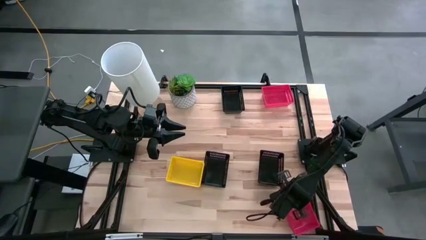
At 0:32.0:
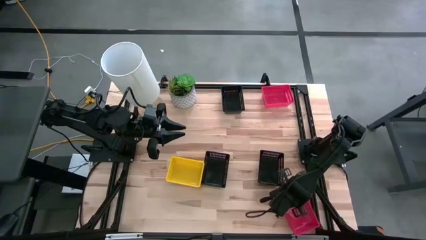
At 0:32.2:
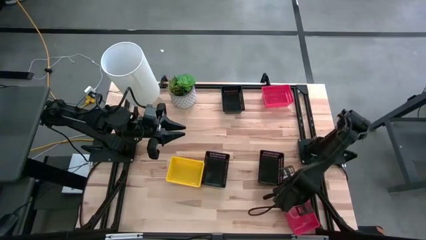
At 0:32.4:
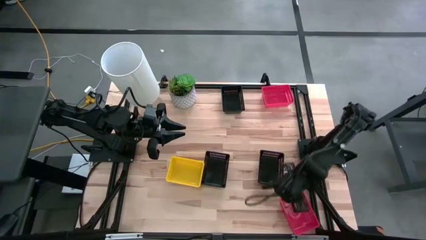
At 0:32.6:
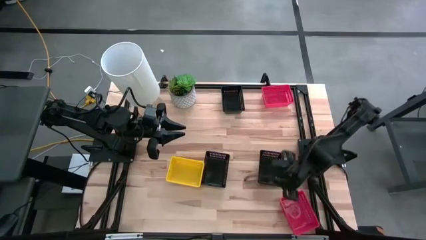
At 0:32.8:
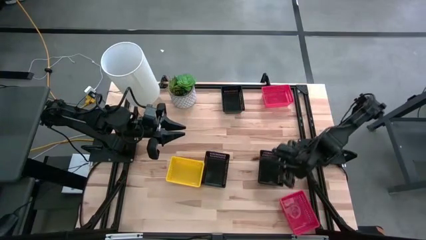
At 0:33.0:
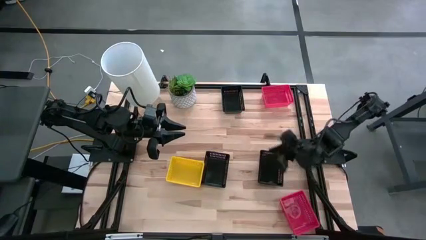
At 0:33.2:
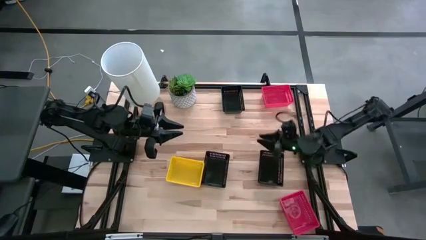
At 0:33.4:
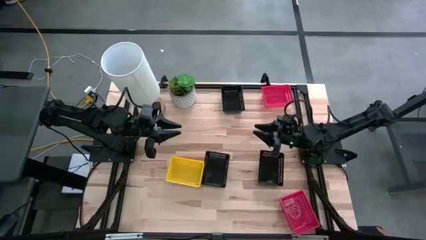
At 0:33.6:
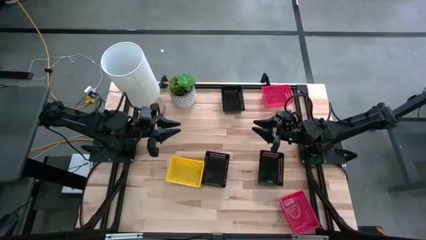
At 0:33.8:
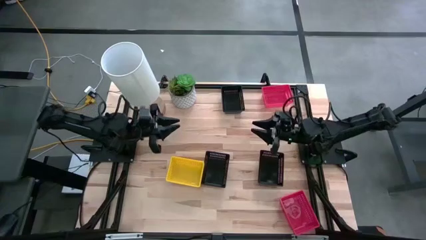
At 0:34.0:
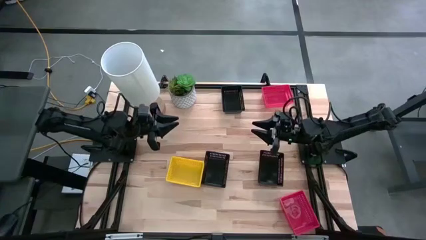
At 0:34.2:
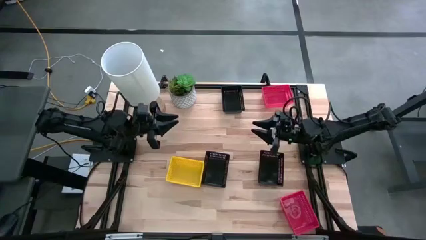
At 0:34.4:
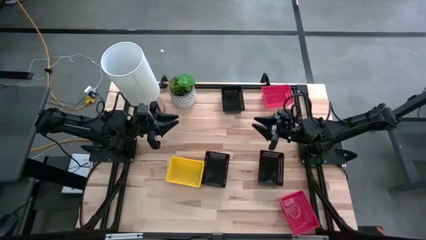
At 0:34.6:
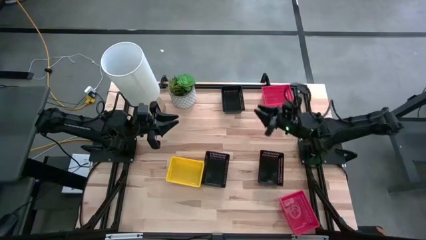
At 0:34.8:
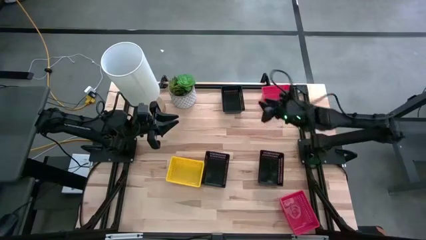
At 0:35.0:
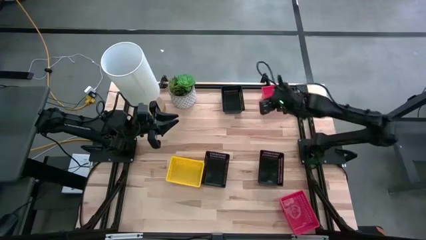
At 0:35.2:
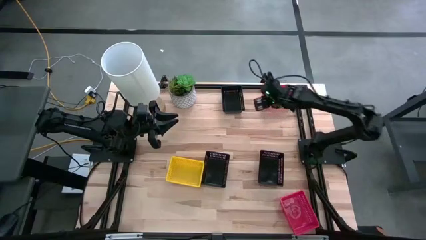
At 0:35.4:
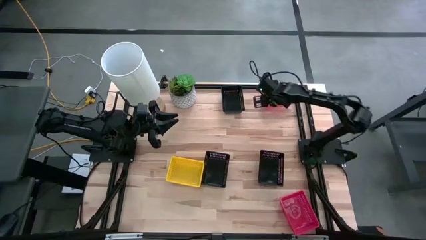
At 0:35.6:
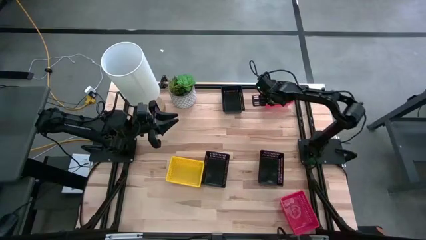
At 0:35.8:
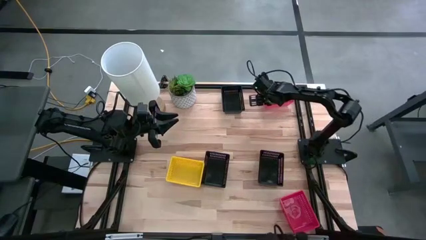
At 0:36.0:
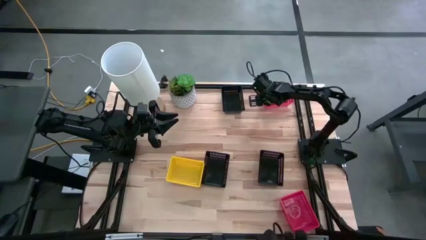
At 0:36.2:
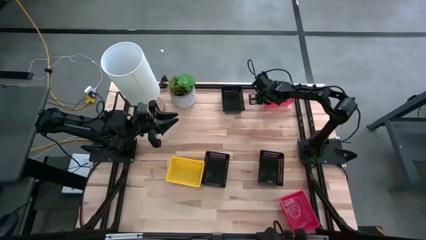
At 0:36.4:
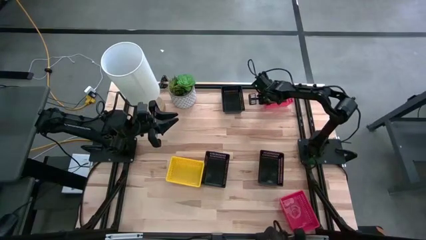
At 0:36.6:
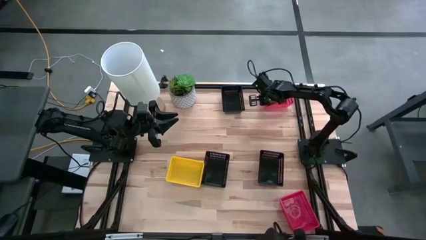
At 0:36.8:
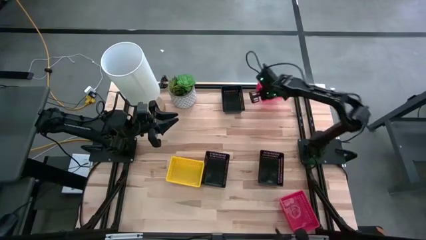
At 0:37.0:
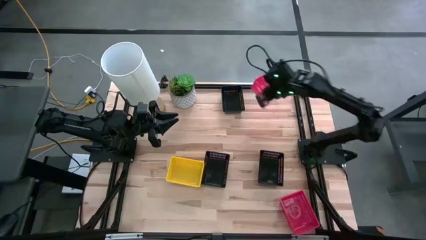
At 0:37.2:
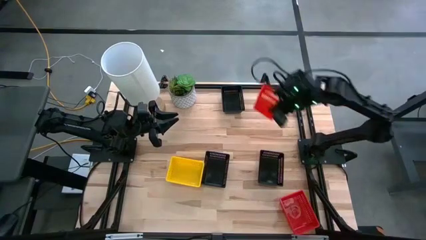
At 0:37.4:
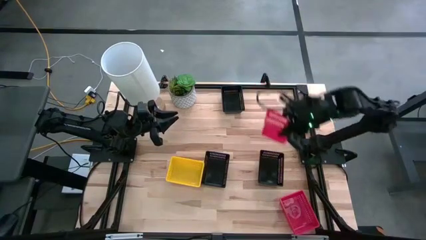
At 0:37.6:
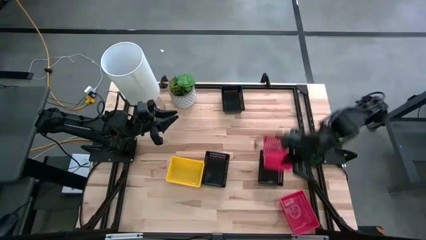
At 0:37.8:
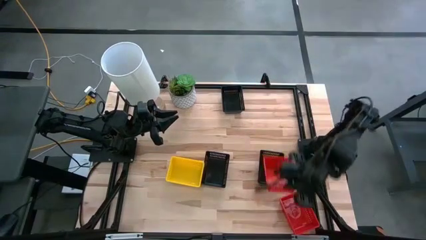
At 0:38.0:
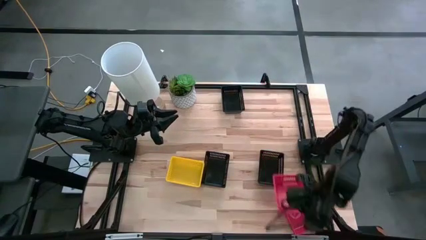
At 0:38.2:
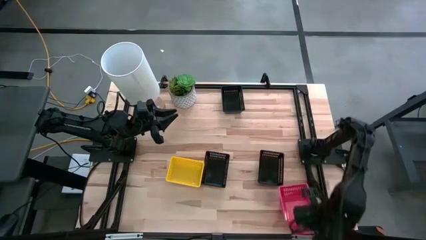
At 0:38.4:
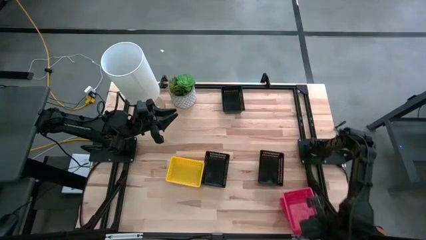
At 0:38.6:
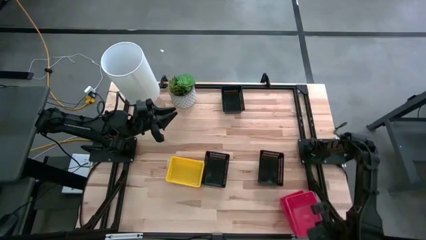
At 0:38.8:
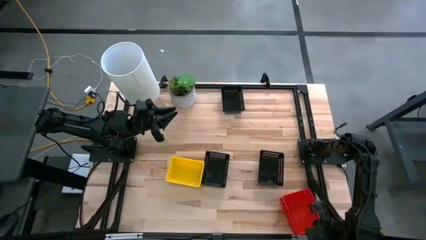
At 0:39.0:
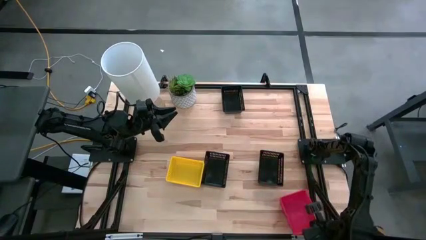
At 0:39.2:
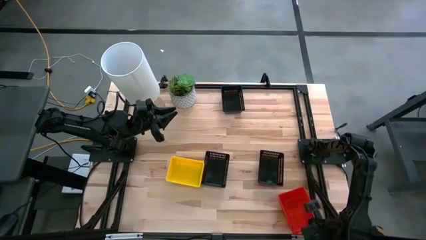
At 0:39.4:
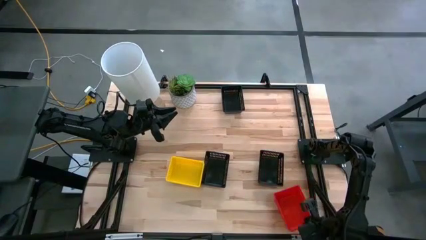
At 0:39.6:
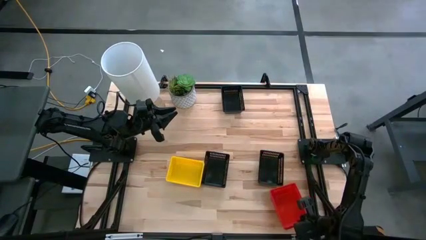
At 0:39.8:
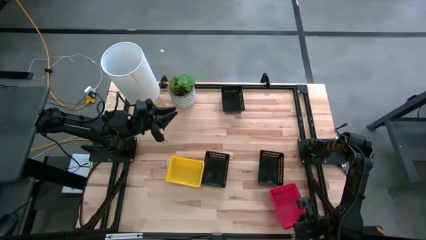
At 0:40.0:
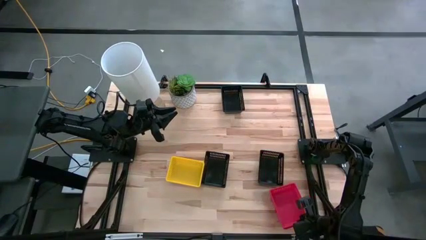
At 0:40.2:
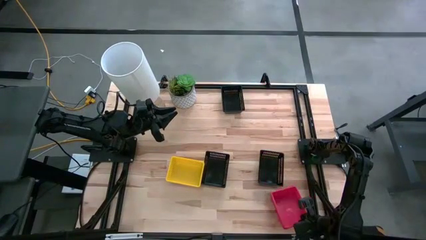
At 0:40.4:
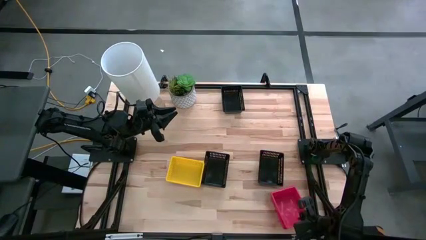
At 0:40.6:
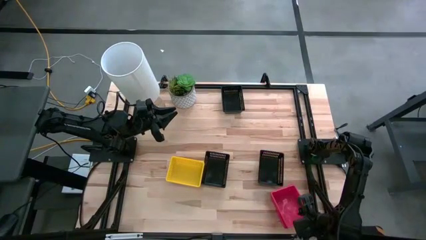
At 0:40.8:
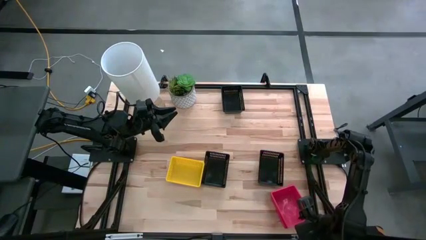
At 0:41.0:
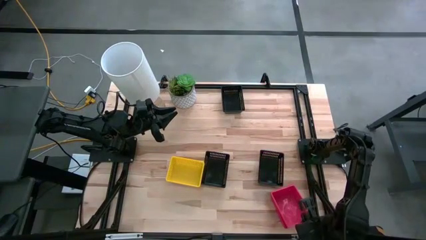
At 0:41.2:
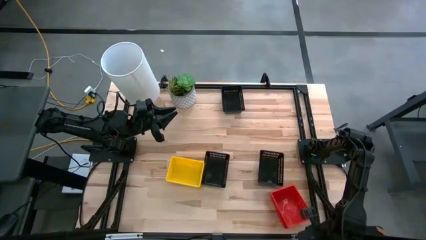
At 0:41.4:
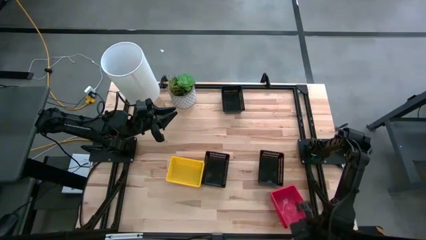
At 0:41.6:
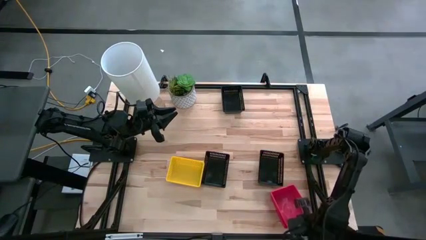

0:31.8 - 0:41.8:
Stack the top red bin on the bottom red bin

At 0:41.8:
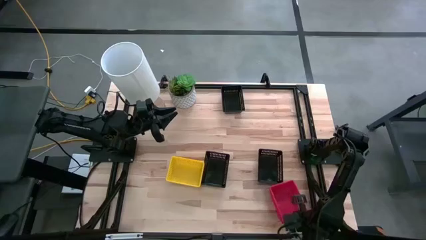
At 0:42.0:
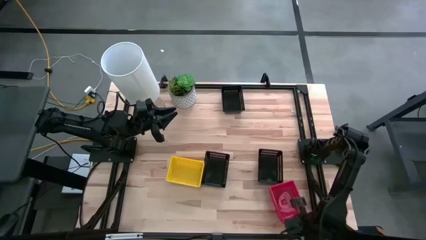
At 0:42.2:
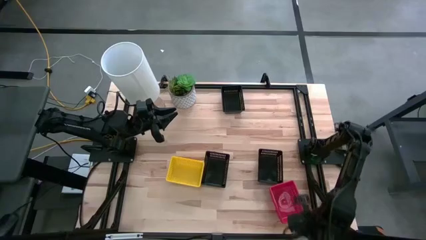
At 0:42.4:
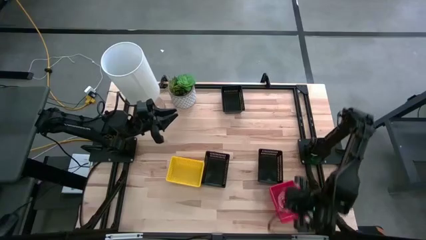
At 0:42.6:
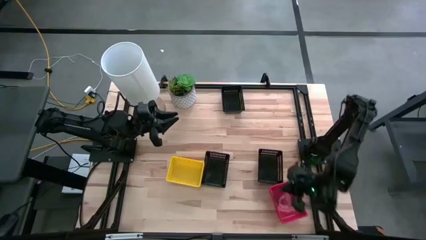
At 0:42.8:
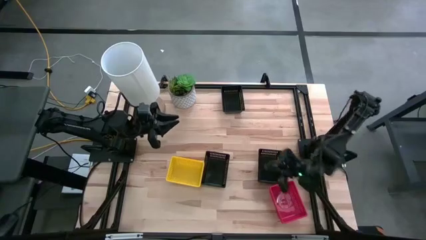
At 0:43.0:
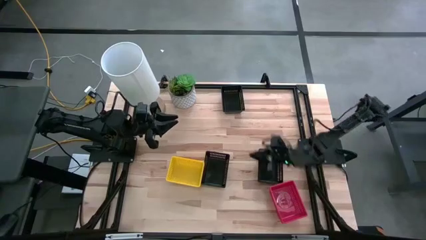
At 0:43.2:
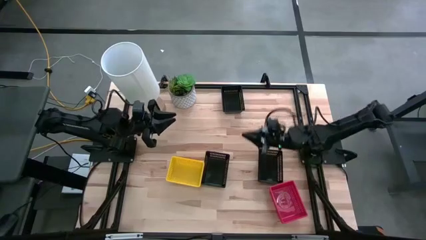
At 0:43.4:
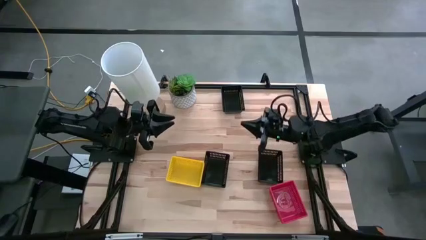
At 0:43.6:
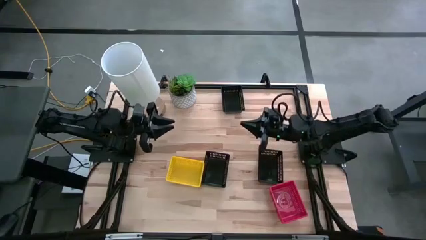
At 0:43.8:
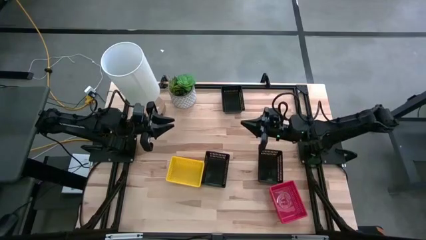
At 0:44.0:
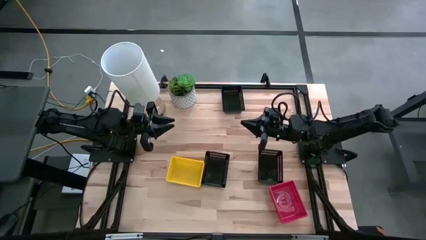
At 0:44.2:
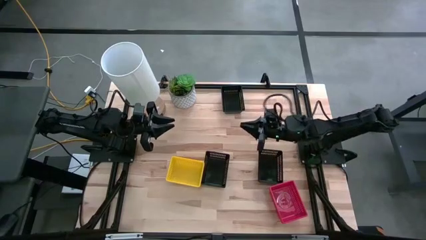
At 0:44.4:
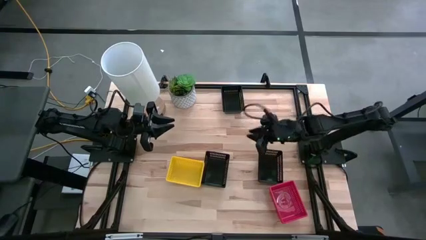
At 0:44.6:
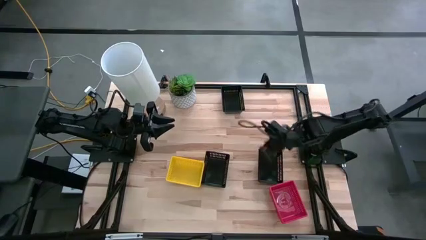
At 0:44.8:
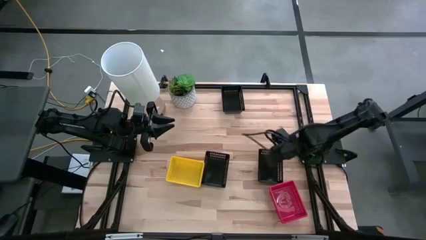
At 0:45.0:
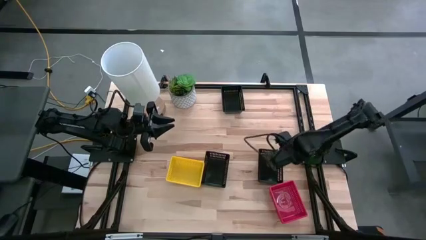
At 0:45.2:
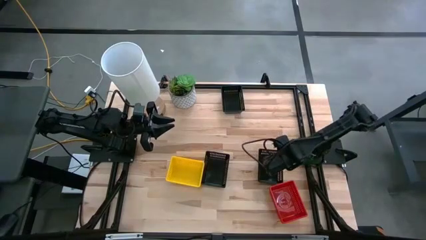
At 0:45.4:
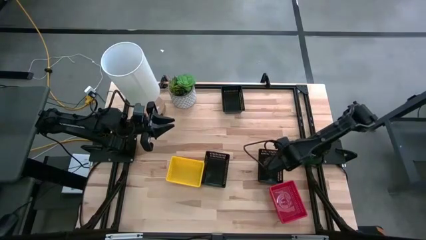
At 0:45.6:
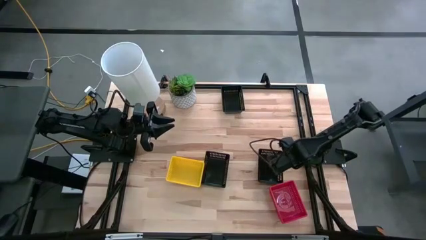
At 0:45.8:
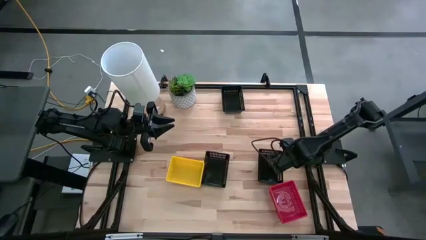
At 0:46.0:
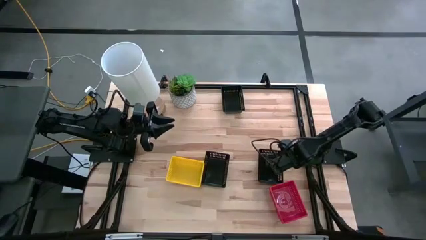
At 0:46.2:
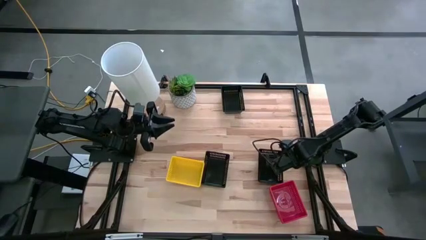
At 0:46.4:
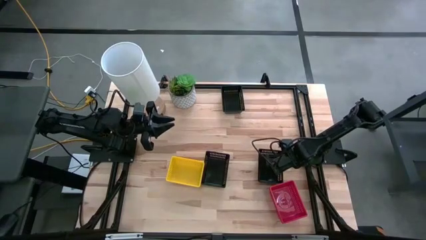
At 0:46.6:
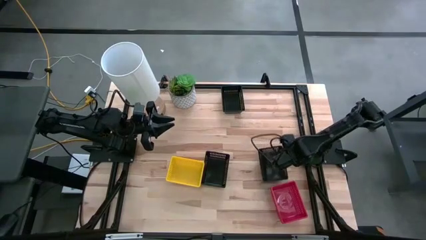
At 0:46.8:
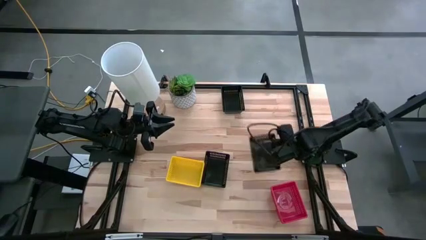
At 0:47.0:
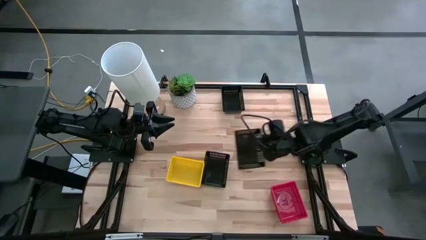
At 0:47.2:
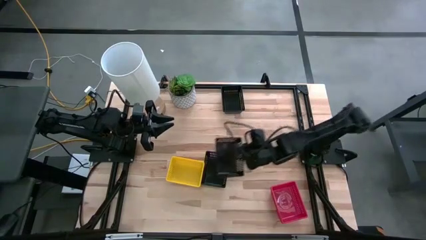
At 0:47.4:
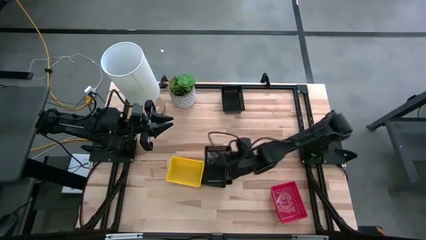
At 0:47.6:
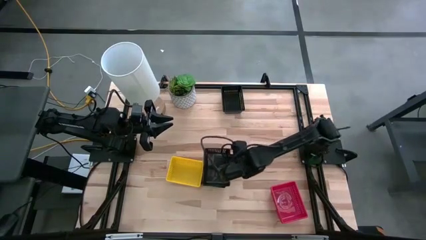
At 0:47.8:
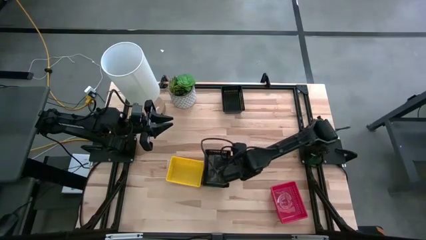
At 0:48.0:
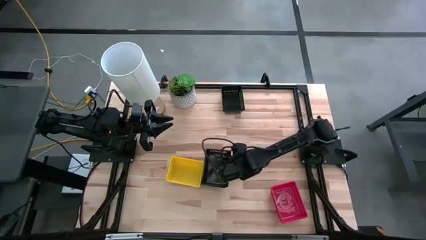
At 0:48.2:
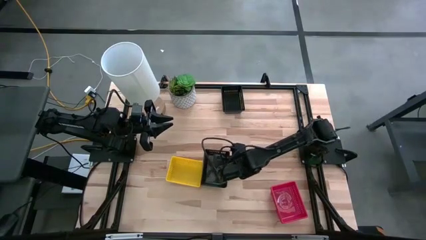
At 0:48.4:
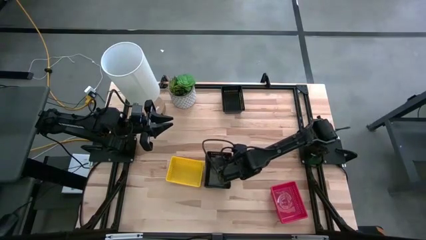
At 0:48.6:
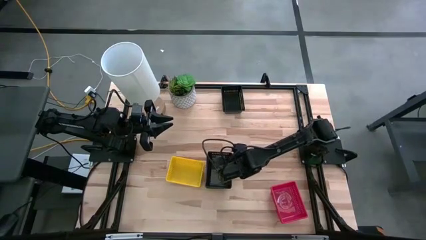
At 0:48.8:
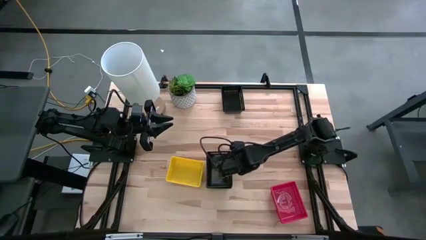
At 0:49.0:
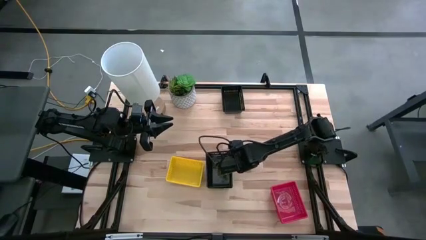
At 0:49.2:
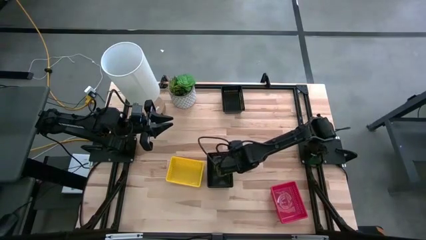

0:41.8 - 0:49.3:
Stack the bottom right black bin on the bottom left black bin
